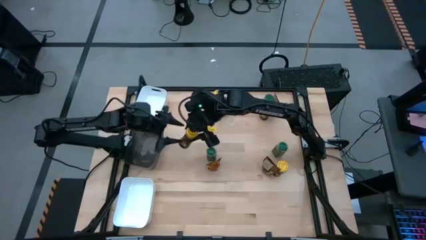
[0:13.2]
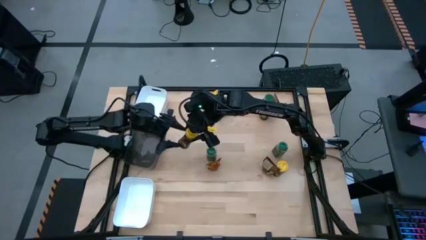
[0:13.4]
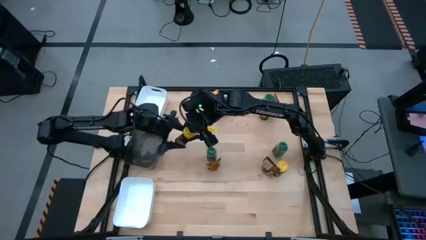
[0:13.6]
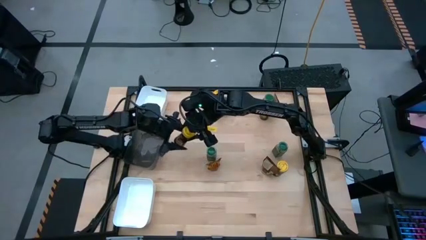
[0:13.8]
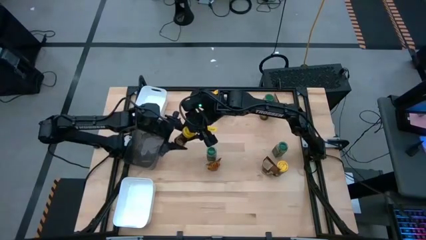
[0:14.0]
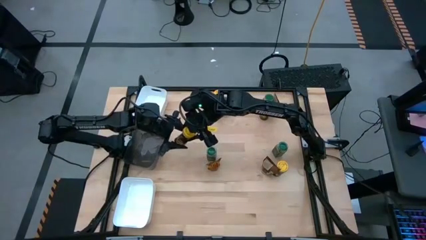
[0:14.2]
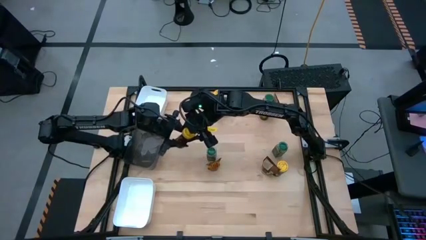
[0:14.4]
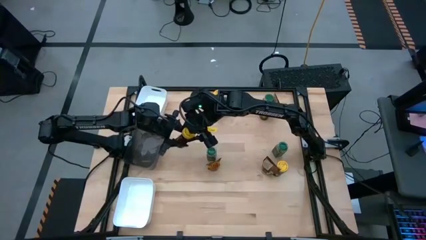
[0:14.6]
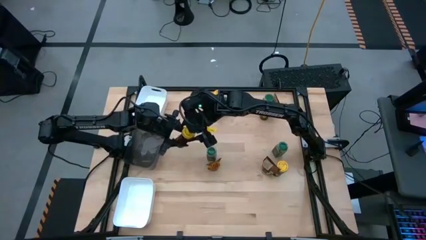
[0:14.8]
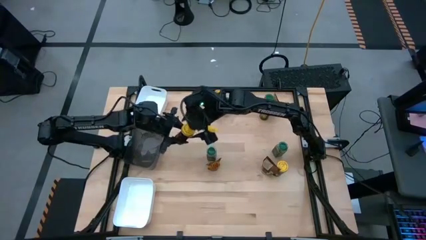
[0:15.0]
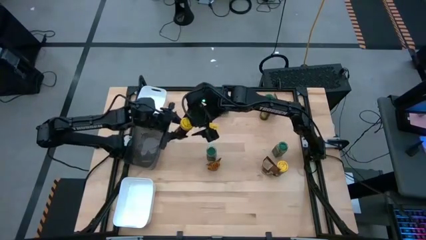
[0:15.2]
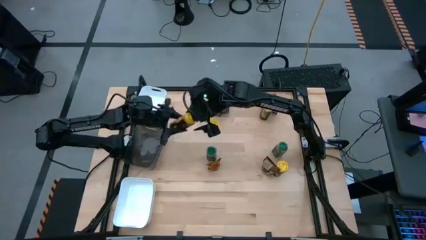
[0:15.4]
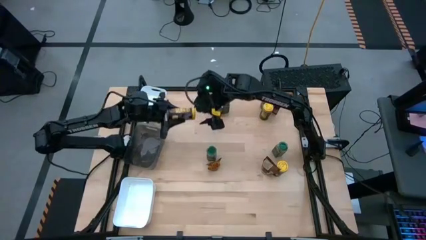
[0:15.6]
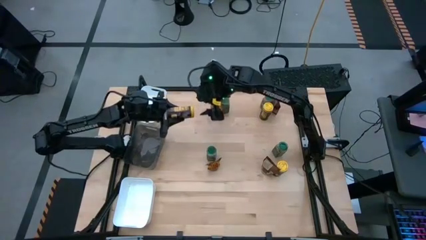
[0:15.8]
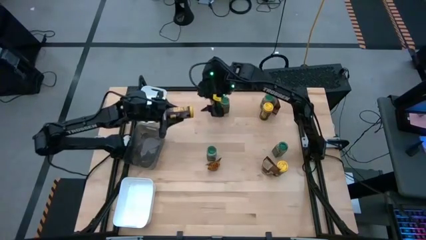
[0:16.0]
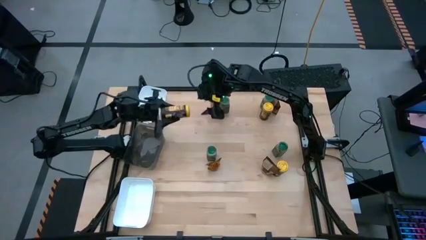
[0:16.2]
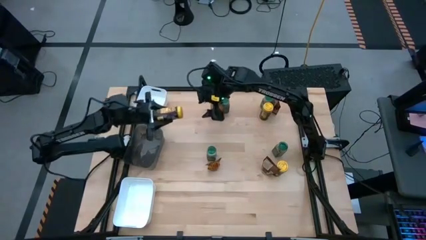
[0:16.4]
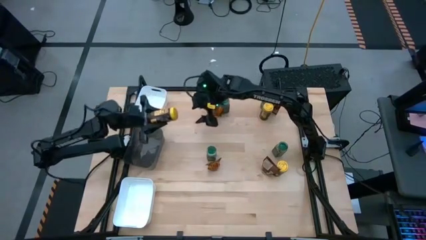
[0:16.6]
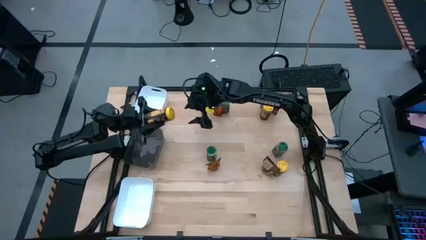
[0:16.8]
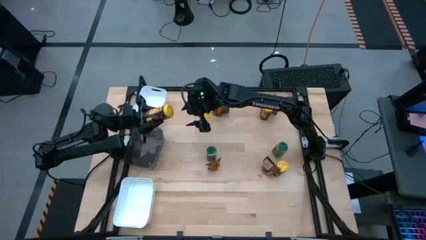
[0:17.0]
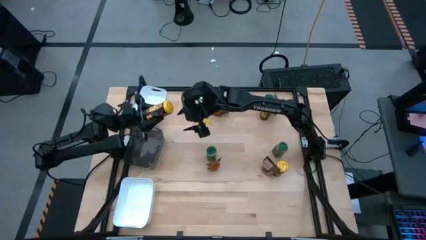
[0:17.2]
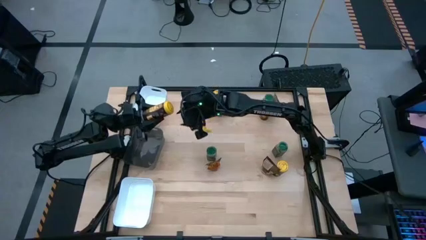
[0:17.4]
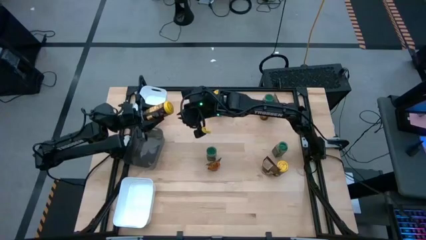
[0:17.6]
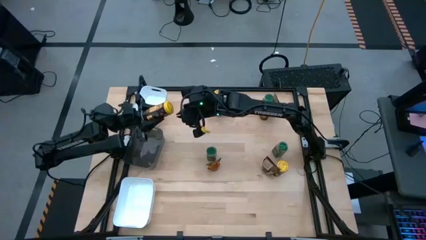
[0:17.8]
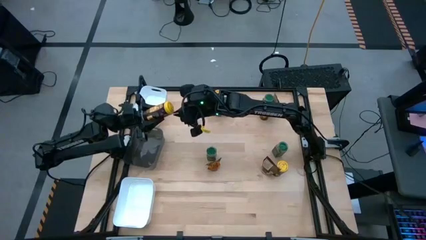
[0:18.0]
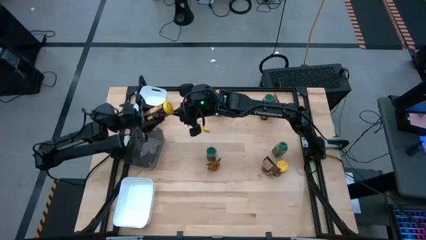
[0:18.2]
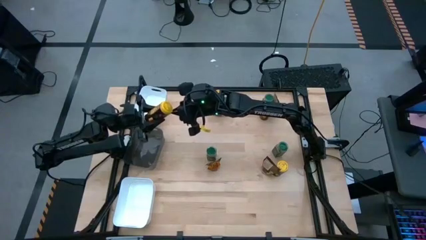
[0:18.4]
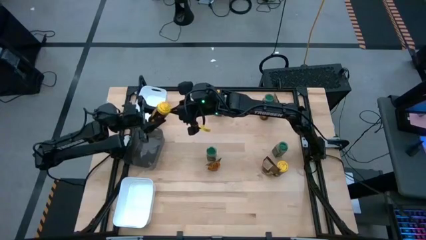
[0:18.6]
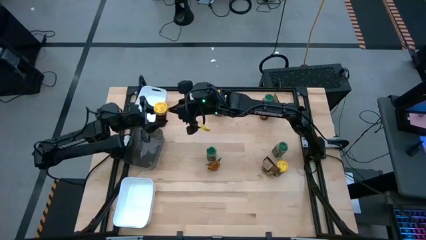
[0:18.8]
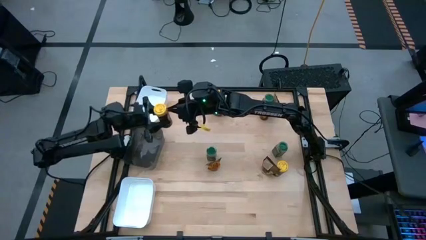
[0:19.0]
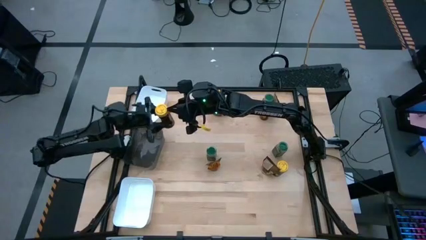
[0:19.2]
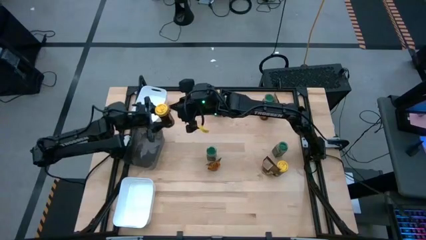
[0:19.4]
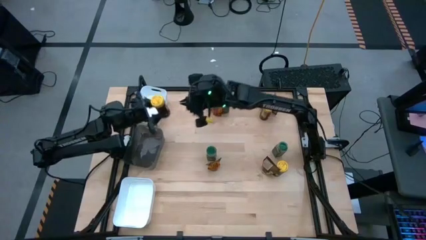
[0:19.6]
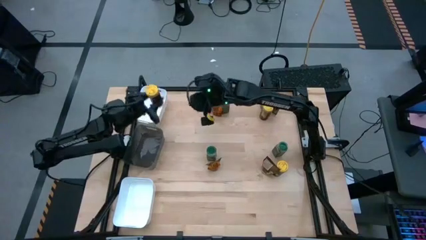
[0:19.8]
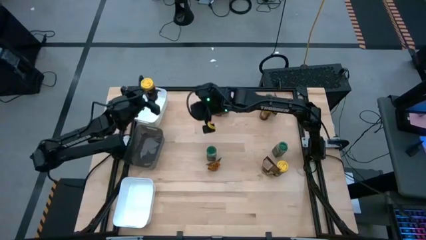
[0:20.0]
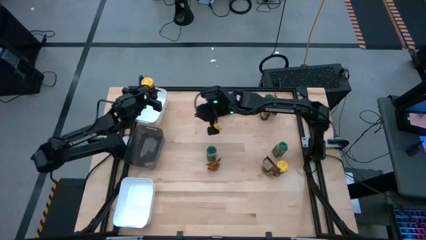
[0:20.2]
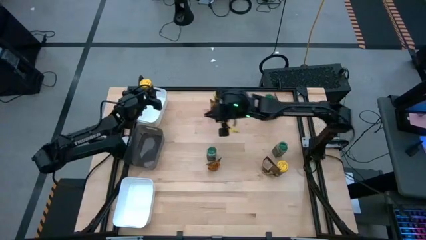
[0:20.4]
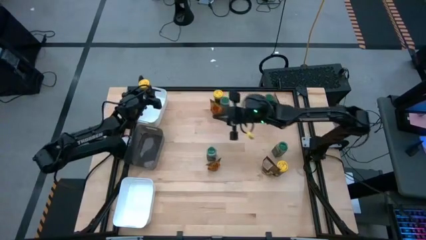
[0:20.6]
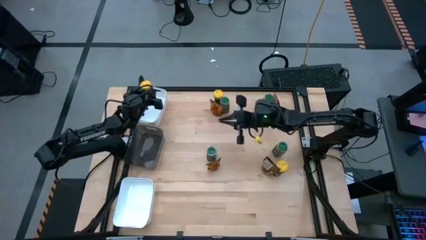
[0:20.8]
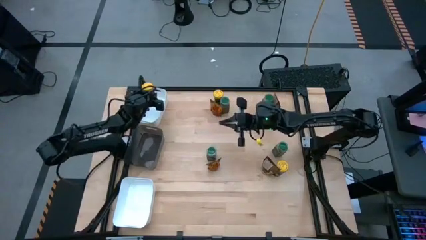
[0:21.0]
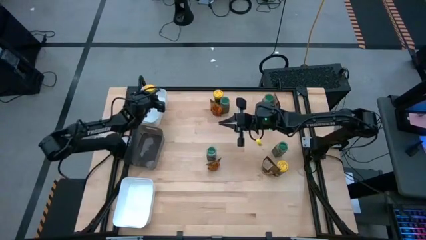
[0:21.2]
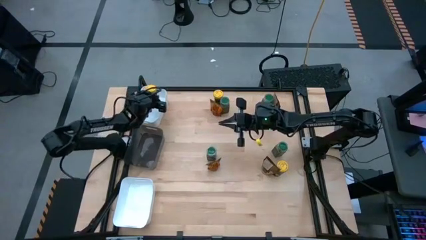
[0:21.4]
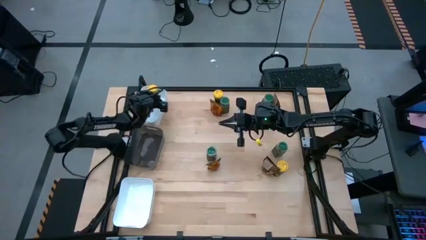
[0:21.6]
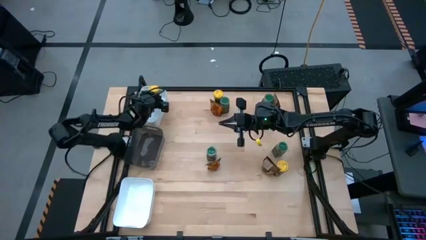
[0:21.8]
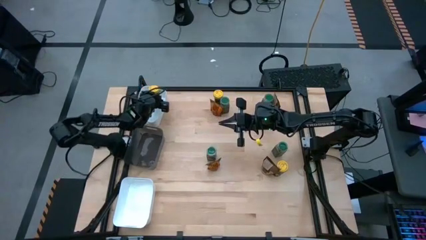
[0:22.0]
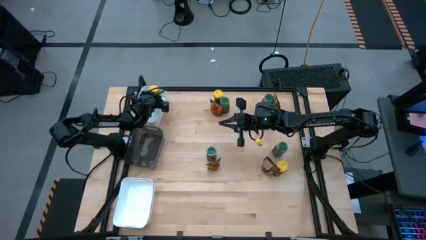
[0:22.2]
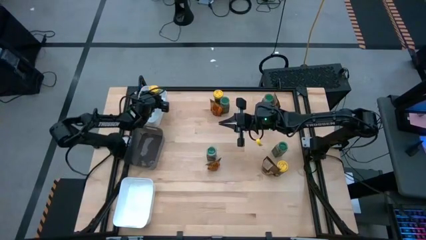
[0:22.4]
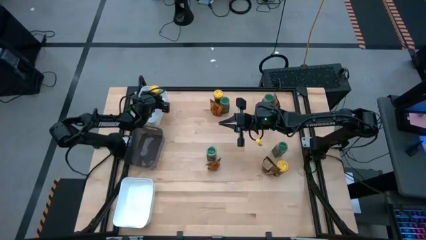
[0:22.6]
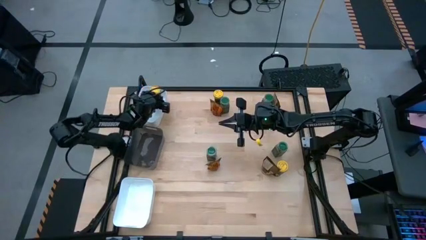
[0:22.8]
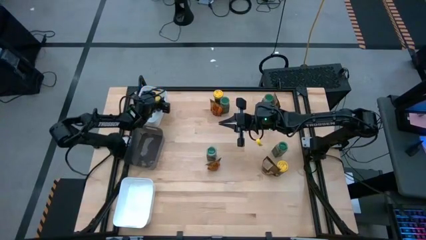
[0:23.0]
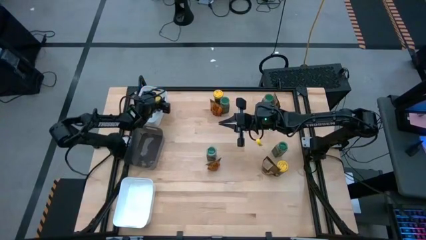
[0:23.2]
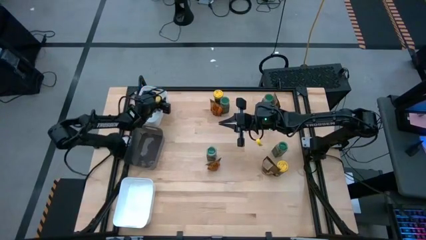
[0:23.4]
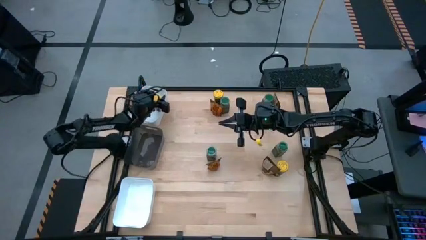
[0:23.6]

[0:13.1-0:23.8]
Task: Sort spices by type
Put the bottom left yellow seasoning bottle into the top white bin
